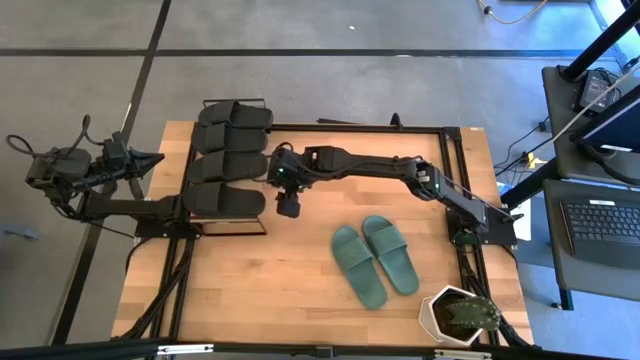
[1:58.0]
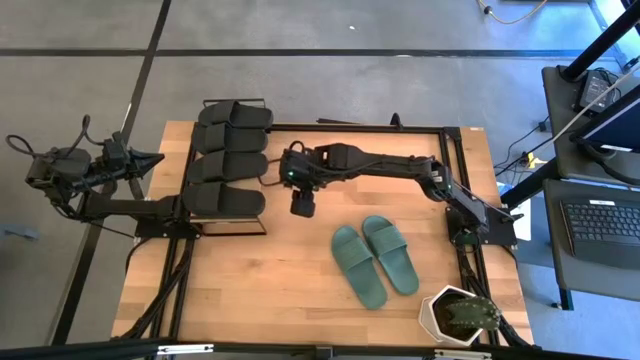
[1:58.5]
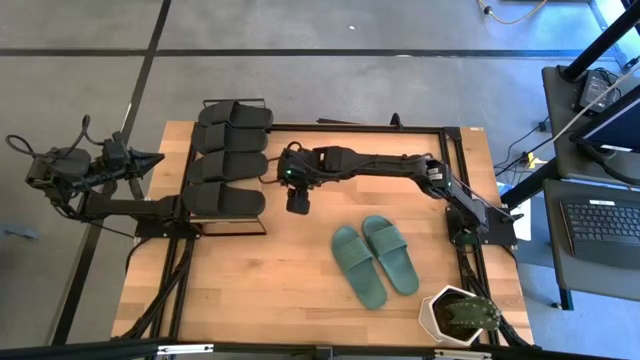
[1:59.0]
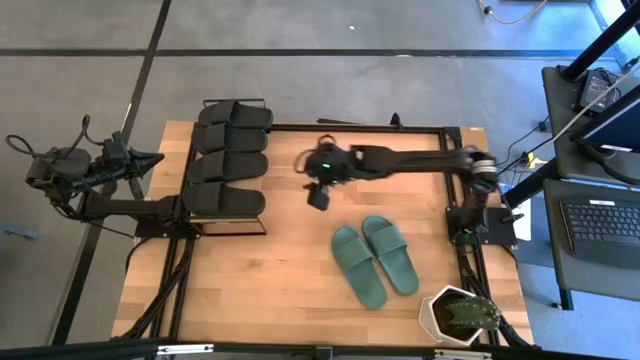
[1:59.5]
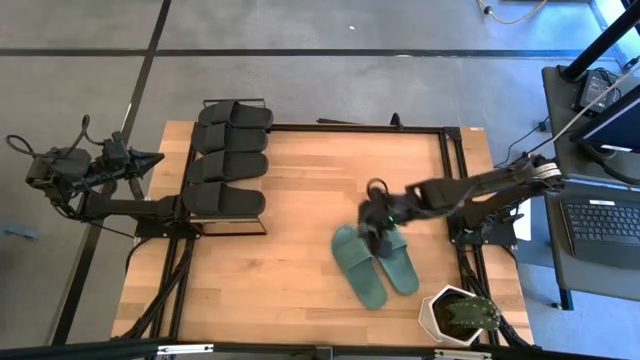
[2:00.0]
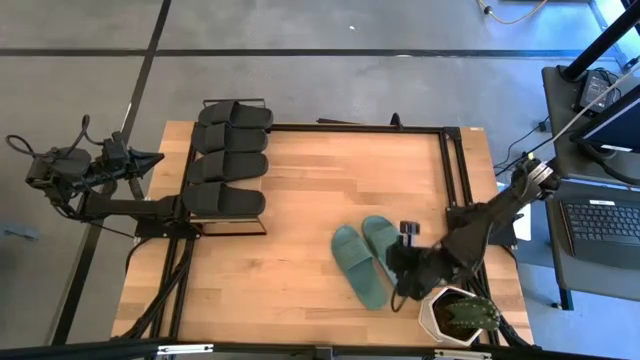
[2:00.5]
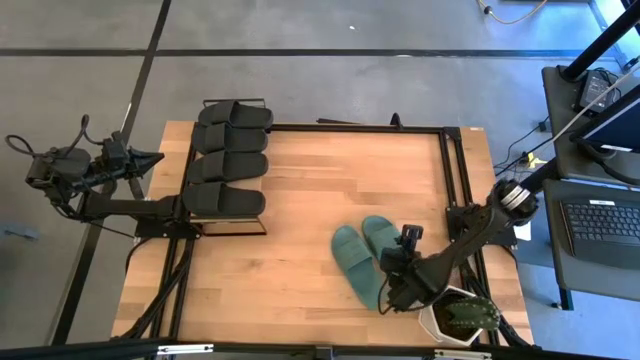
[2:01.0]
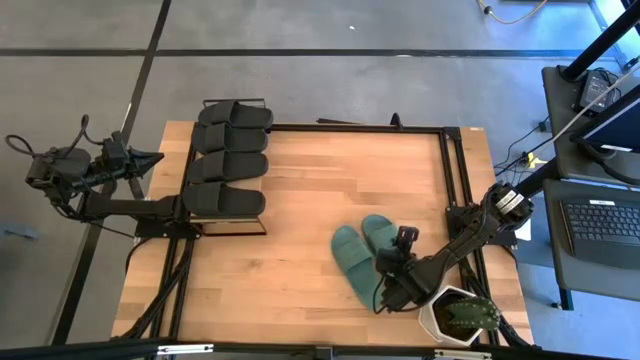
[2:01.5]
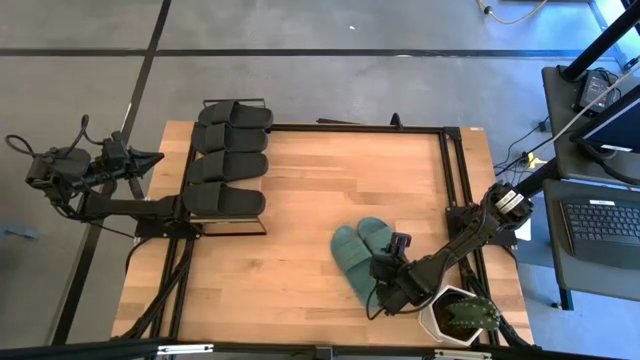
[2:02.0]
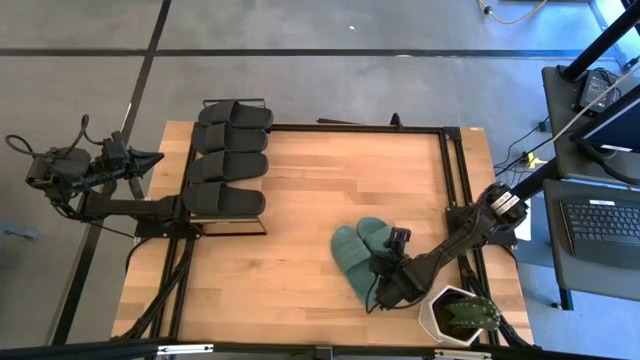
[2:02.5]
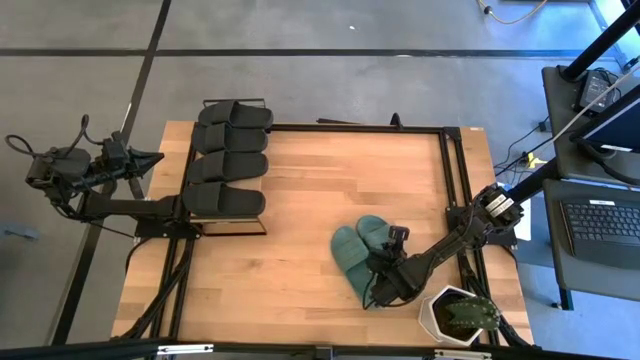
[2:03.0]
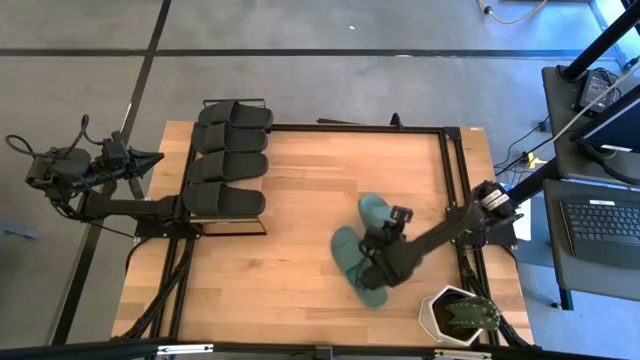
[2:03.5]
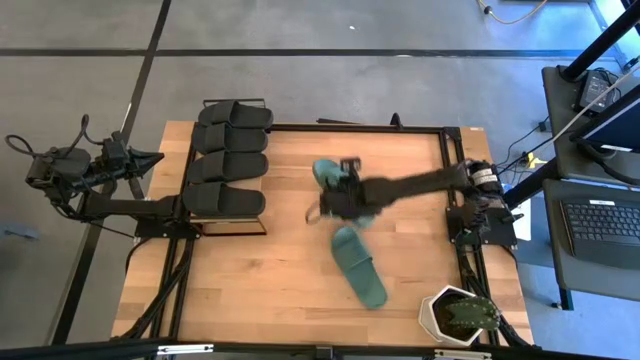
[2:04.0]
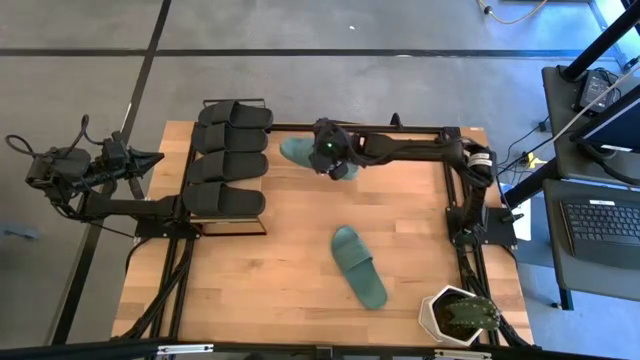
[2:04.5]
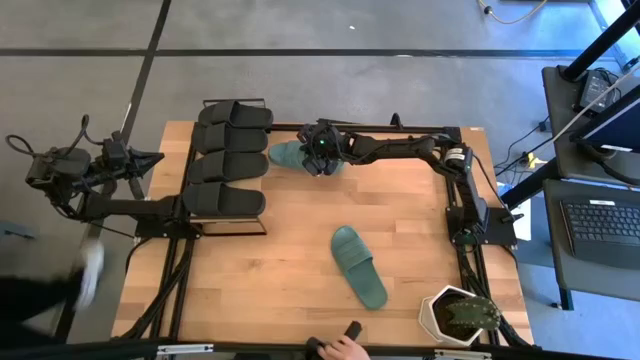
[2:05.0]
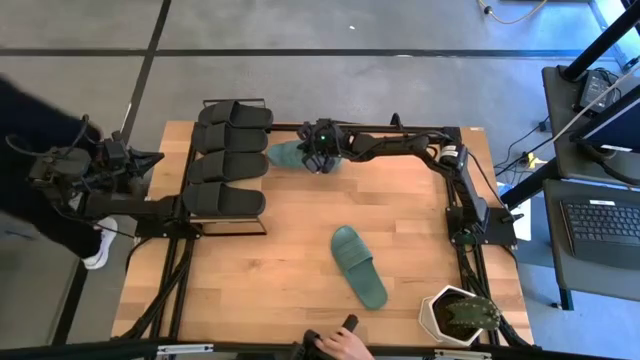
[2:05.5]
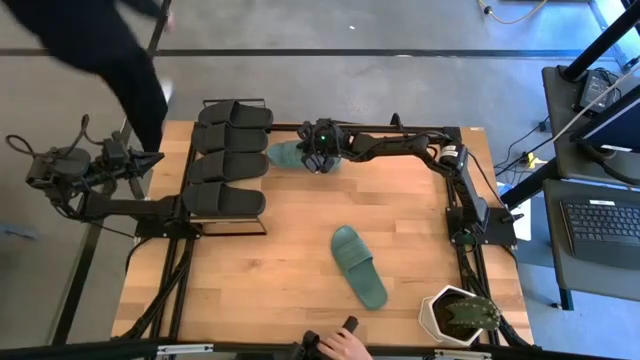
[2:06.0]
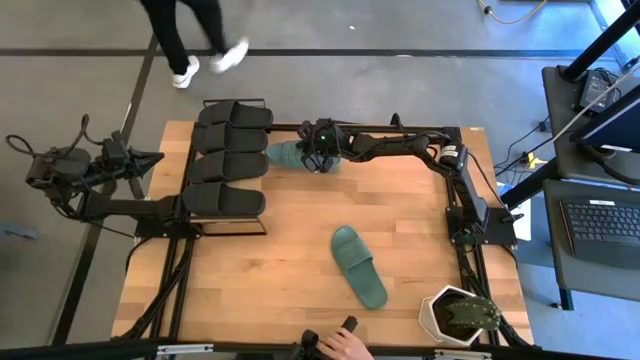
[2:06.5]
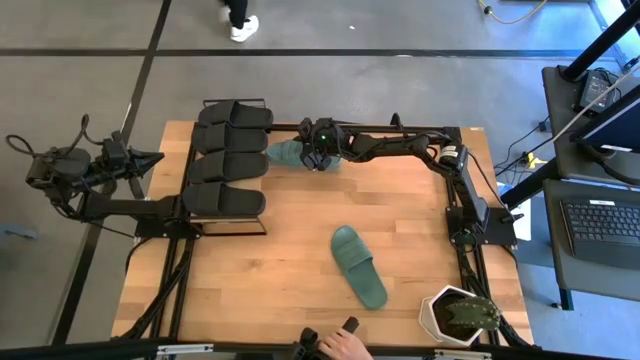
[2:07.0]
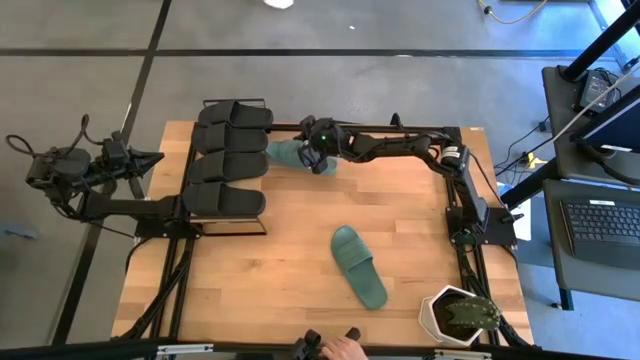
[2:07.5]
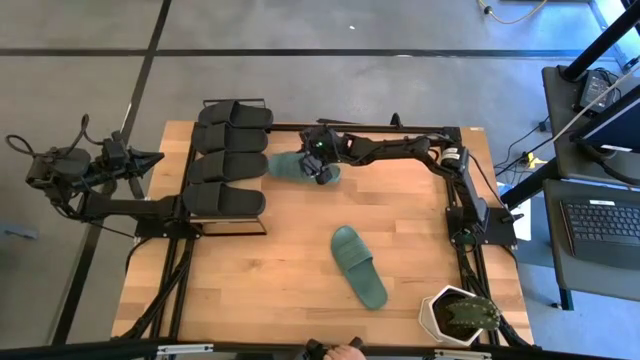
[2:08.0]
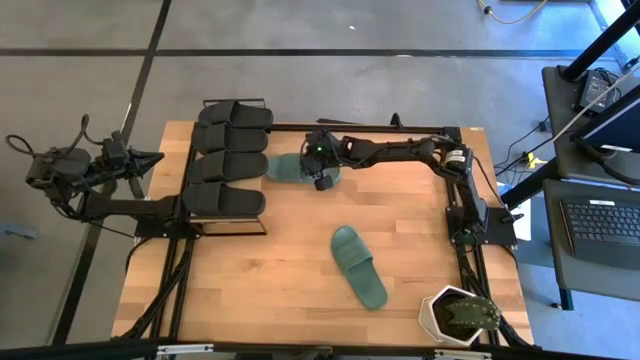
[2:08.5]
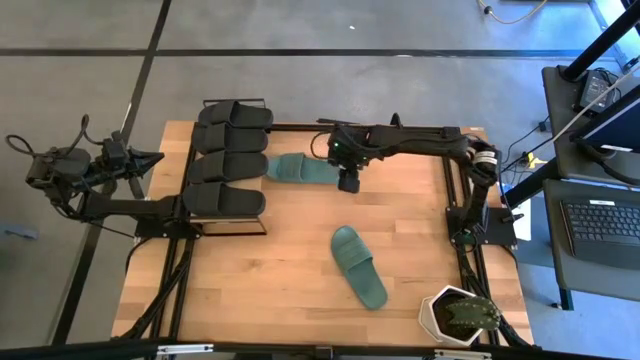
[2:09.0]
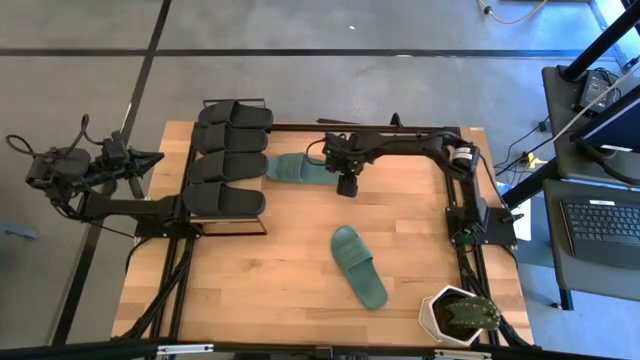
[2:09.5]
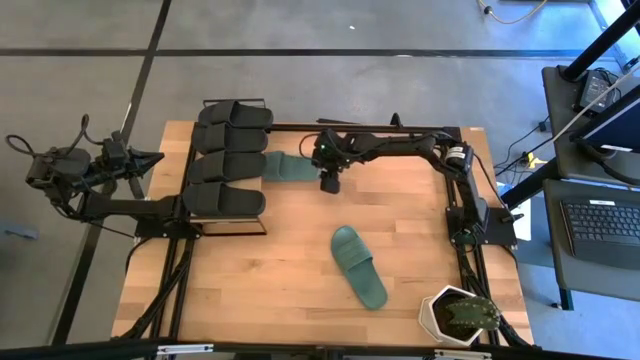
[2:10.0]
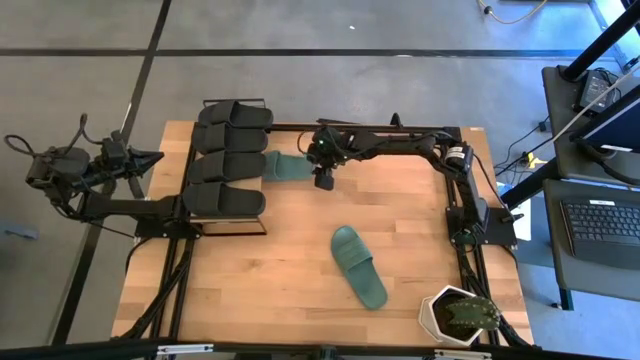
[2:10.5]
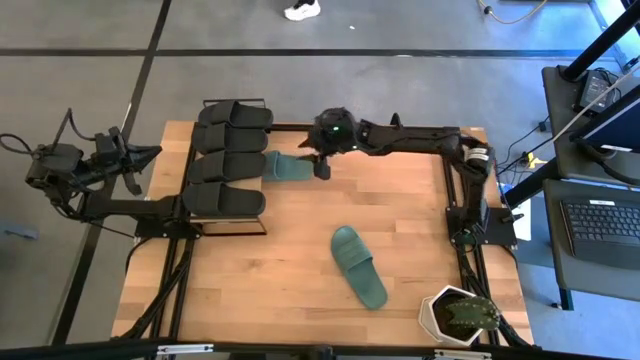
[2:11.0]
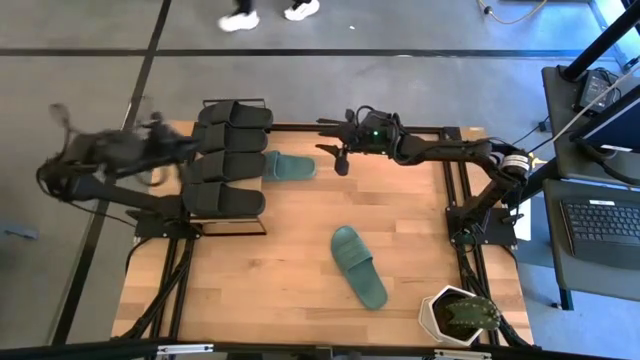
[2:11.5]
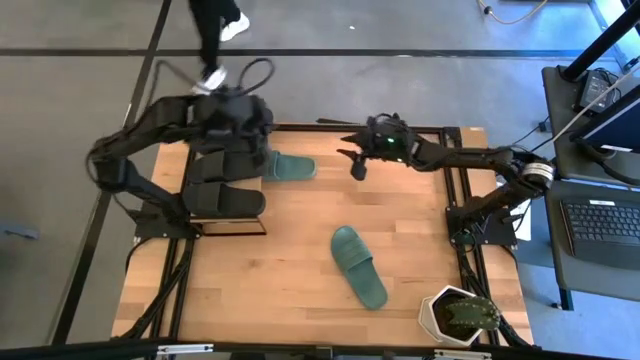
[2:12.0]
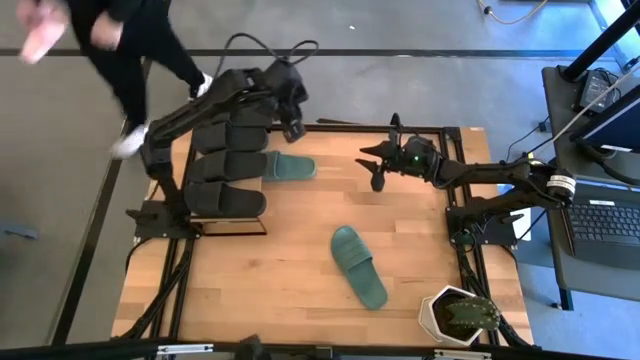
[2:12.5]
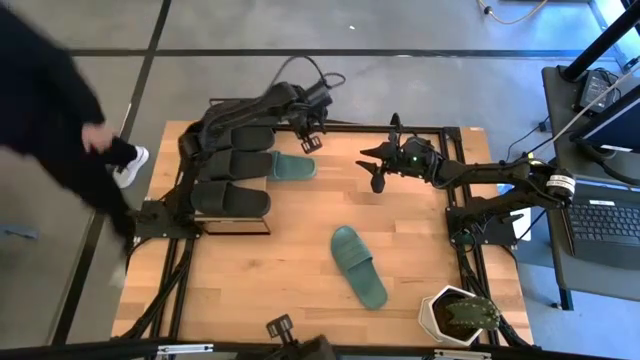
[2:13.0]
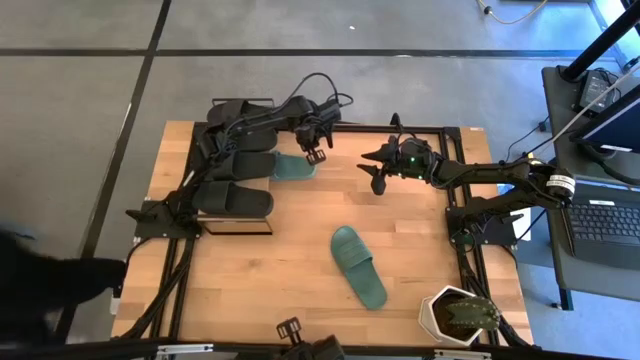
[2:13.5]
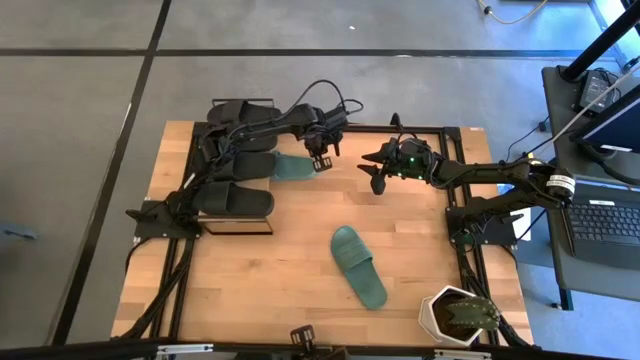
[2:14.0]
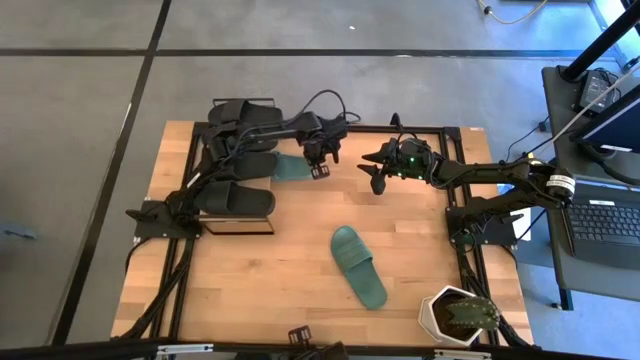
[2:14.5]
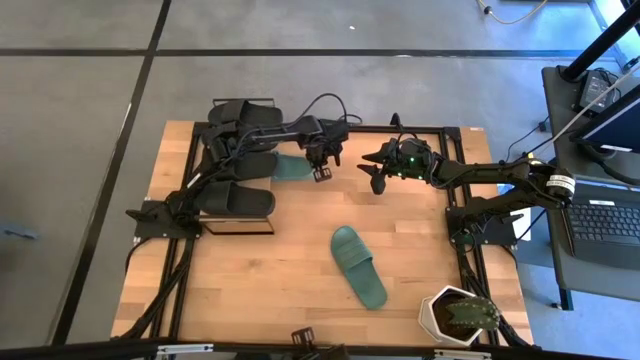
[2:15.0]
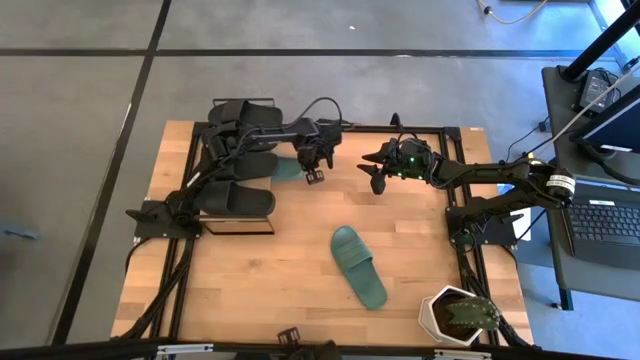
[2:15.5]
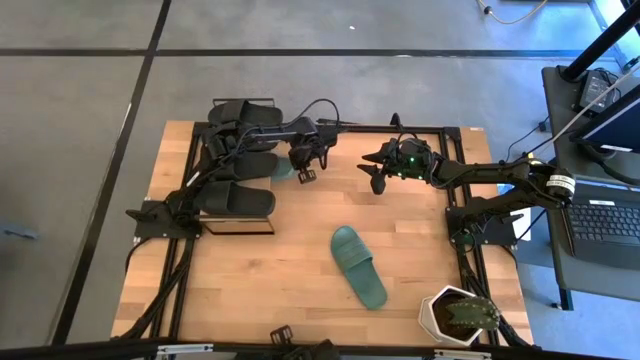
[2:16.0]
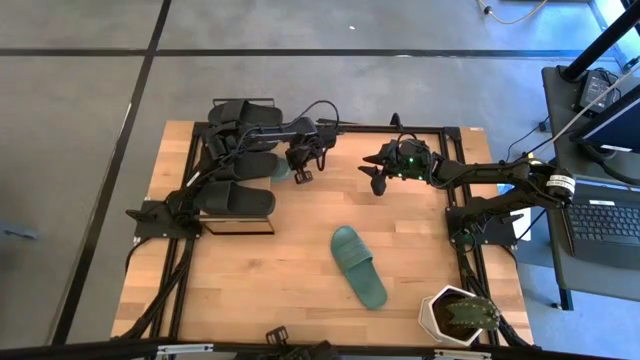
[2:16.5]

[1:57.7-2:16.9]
Task: Pick and place slides into the shelf
Put the green slipper under the shelf
